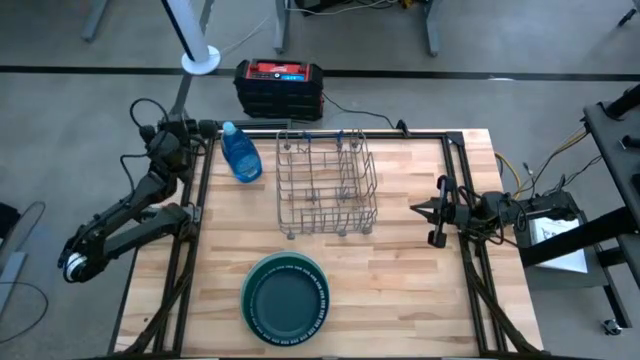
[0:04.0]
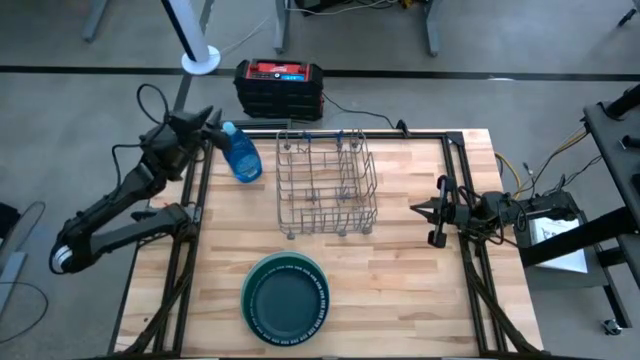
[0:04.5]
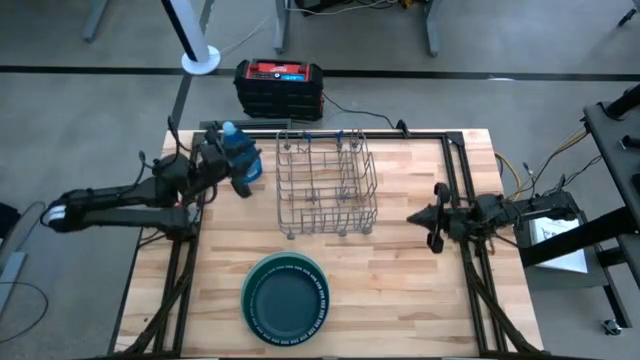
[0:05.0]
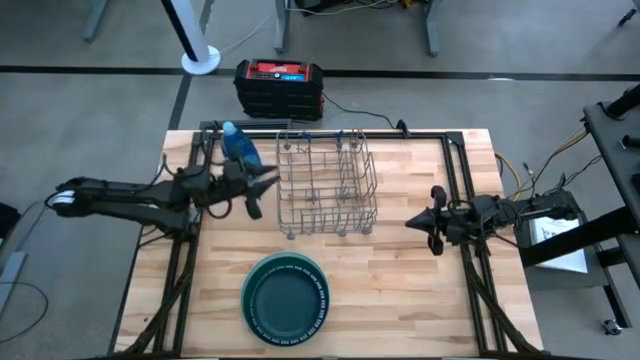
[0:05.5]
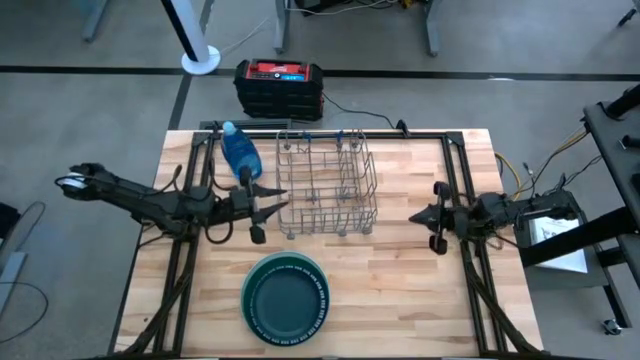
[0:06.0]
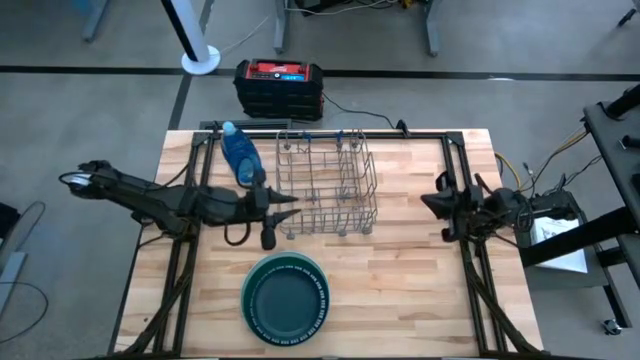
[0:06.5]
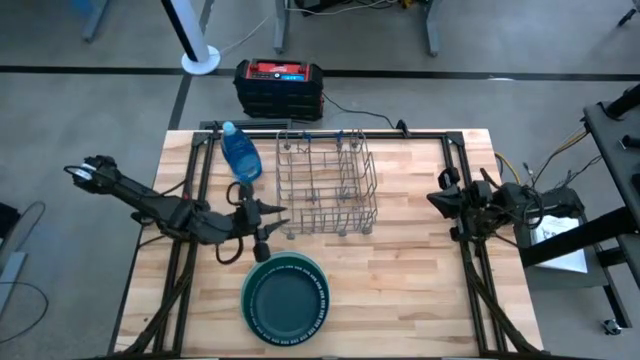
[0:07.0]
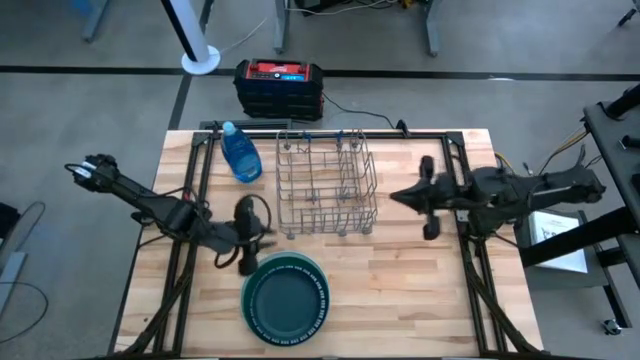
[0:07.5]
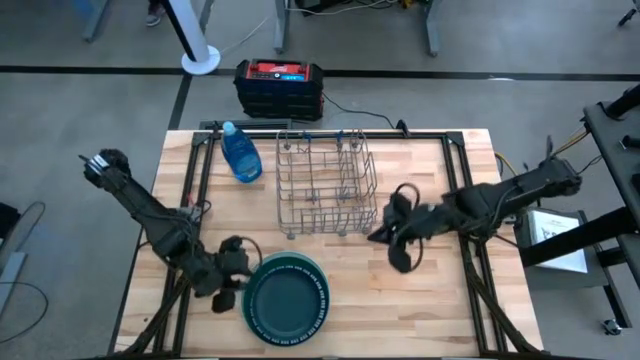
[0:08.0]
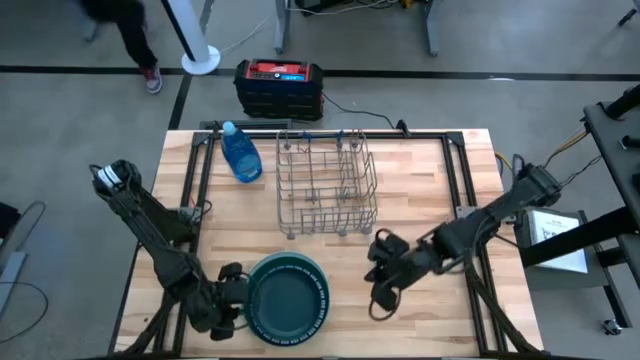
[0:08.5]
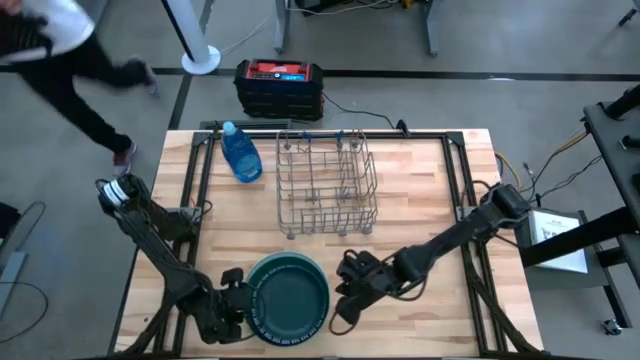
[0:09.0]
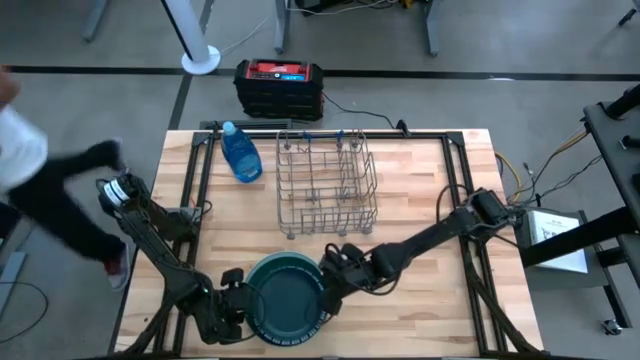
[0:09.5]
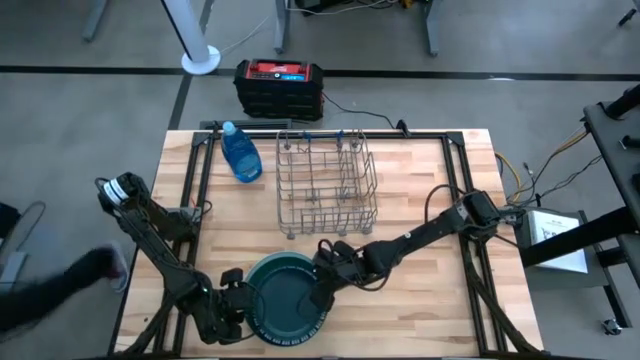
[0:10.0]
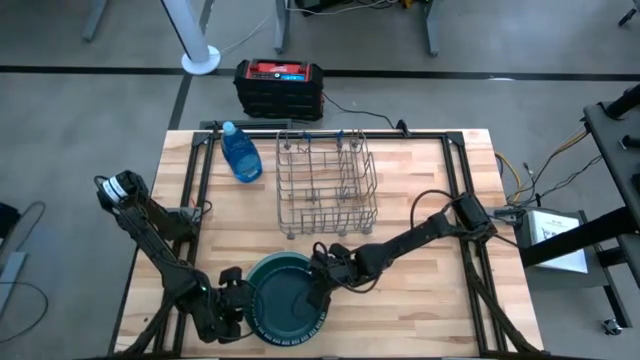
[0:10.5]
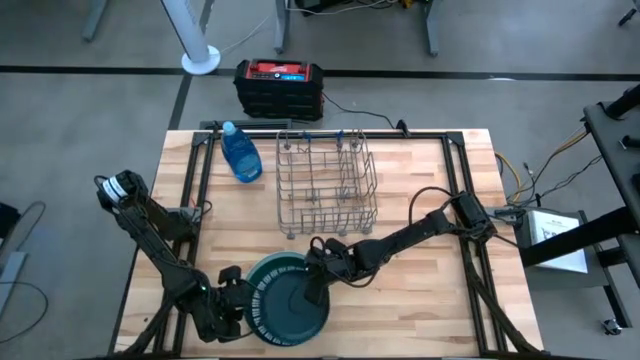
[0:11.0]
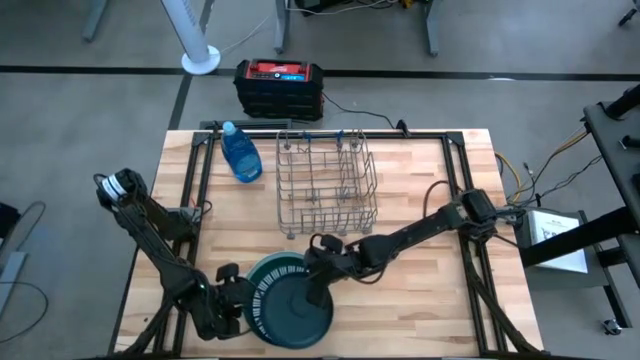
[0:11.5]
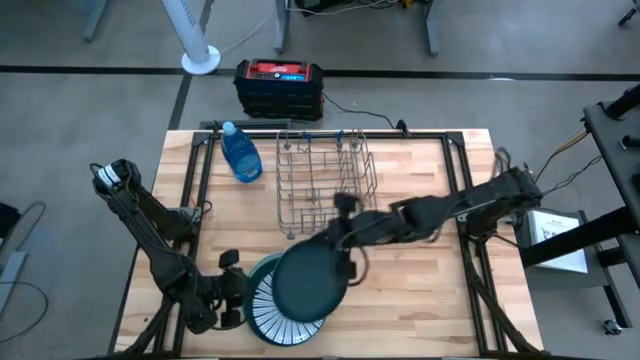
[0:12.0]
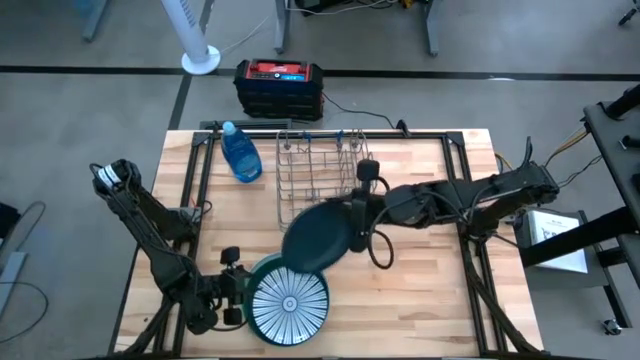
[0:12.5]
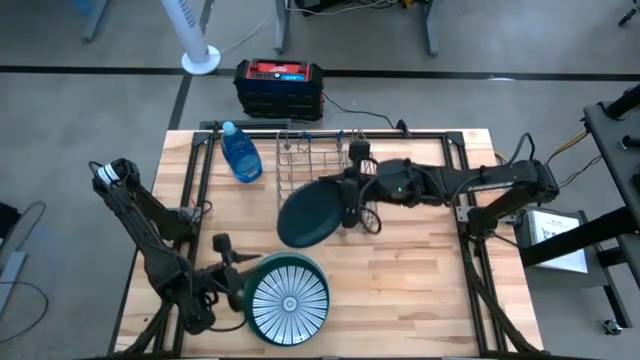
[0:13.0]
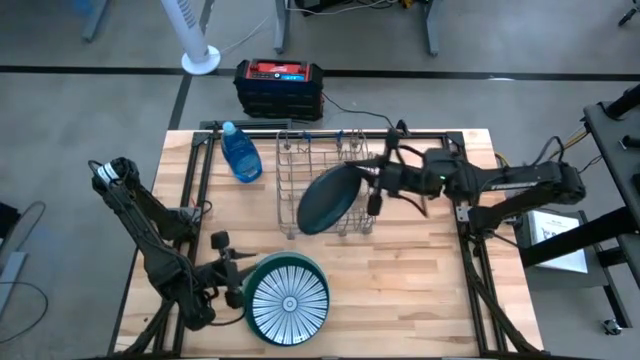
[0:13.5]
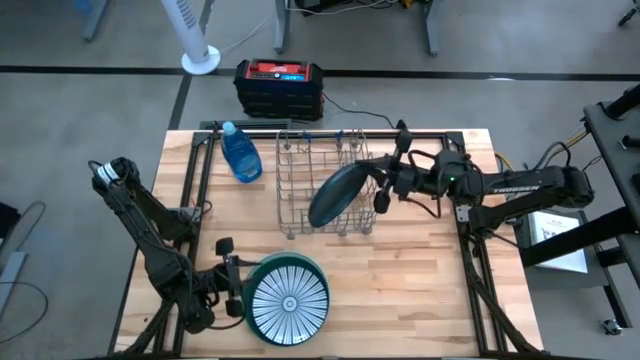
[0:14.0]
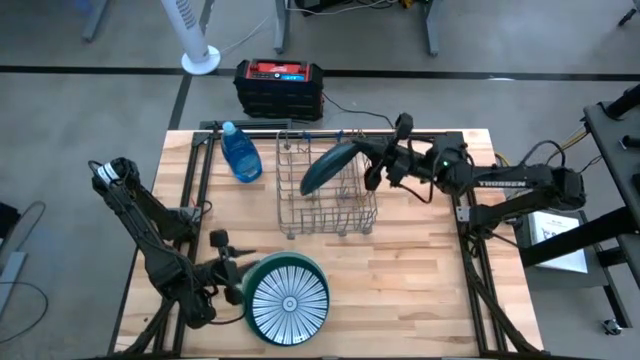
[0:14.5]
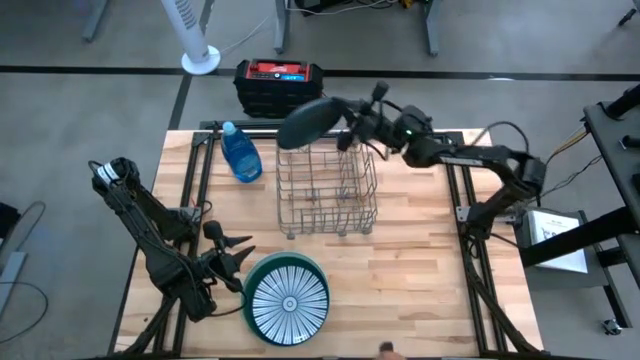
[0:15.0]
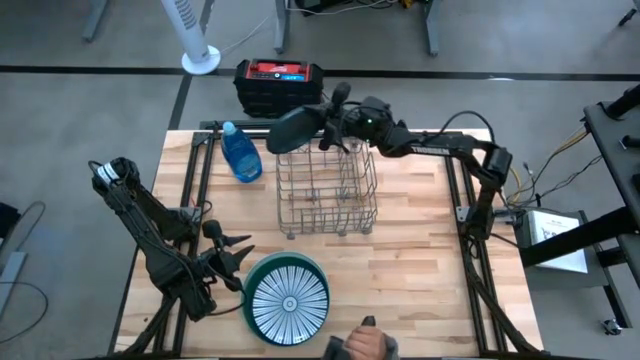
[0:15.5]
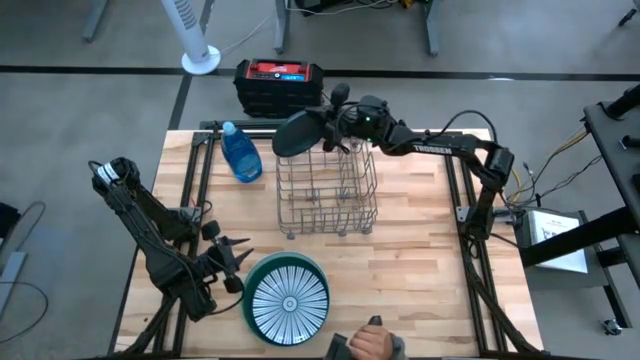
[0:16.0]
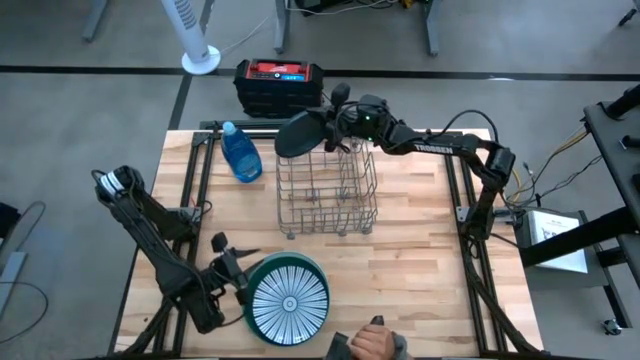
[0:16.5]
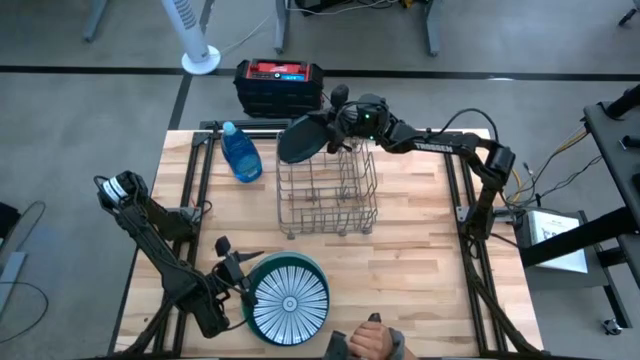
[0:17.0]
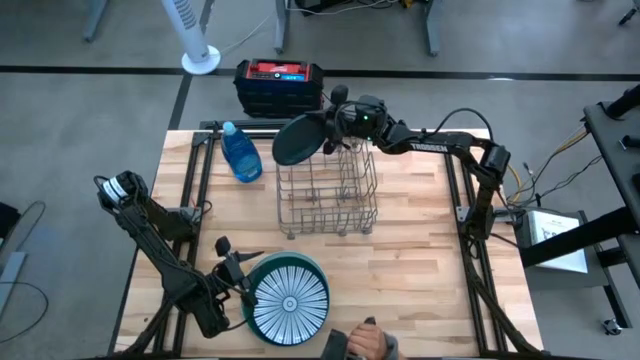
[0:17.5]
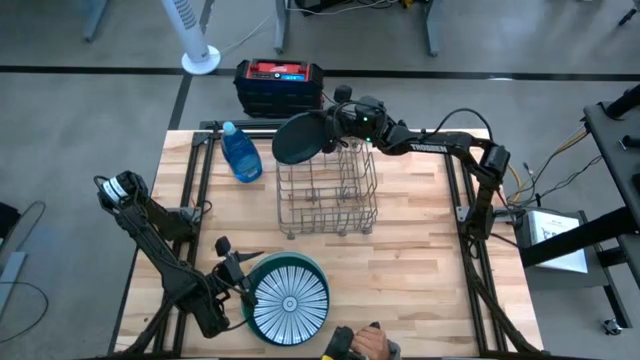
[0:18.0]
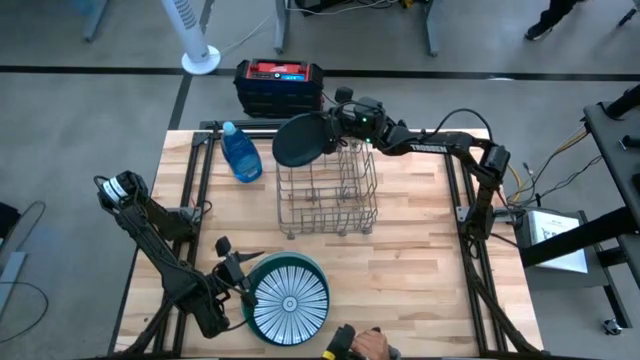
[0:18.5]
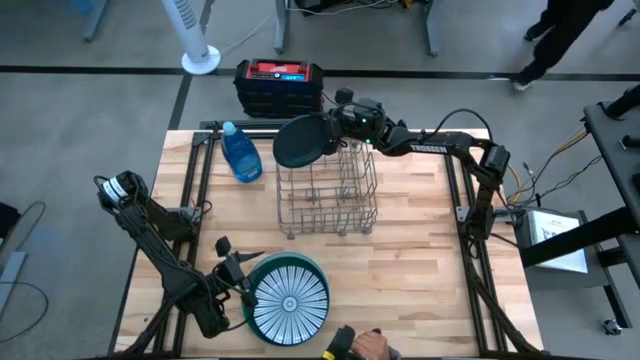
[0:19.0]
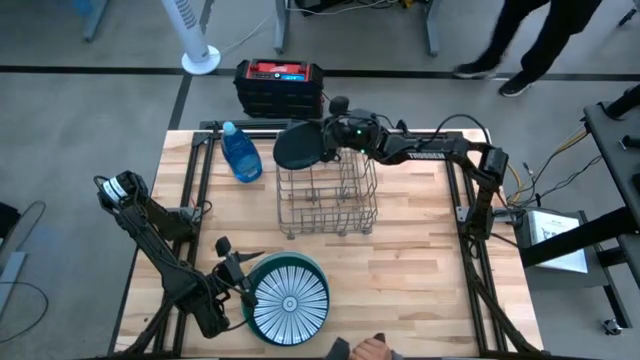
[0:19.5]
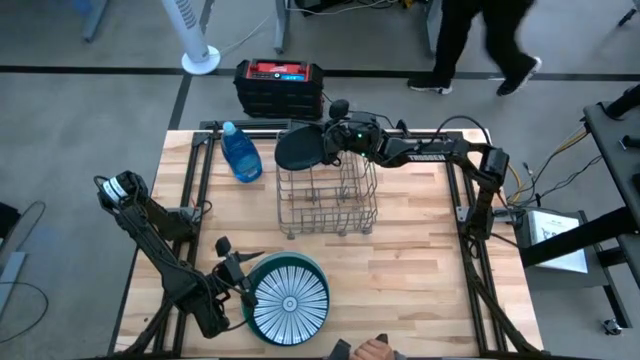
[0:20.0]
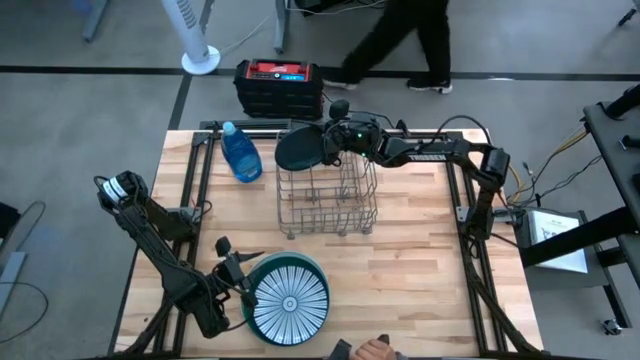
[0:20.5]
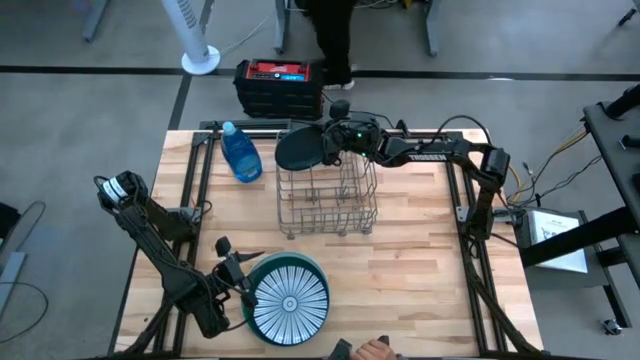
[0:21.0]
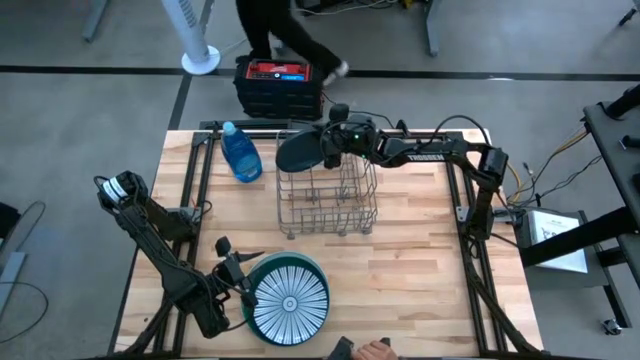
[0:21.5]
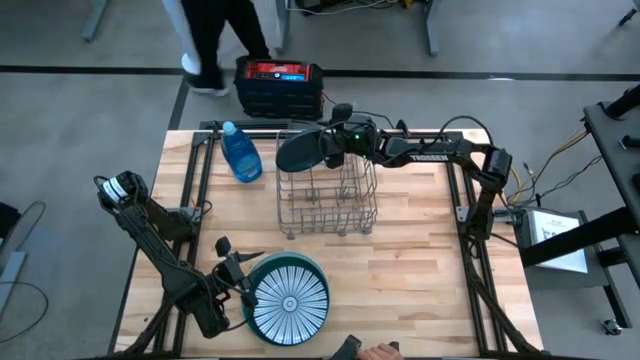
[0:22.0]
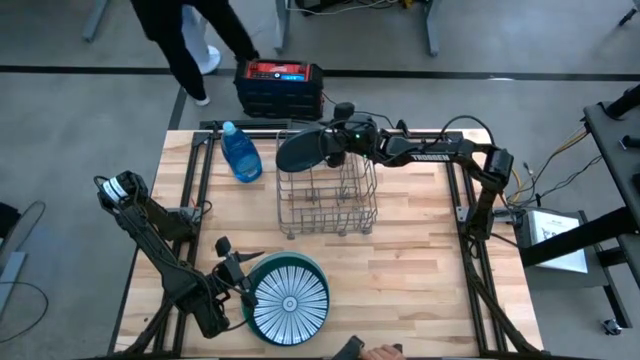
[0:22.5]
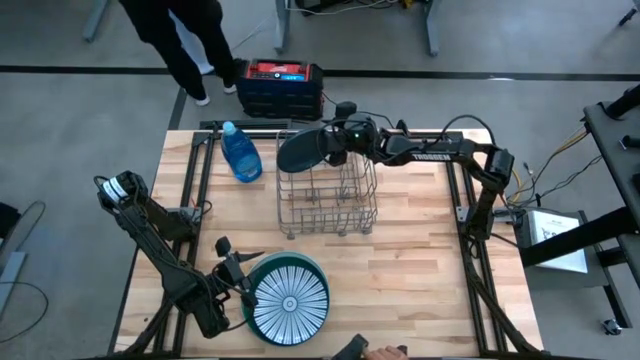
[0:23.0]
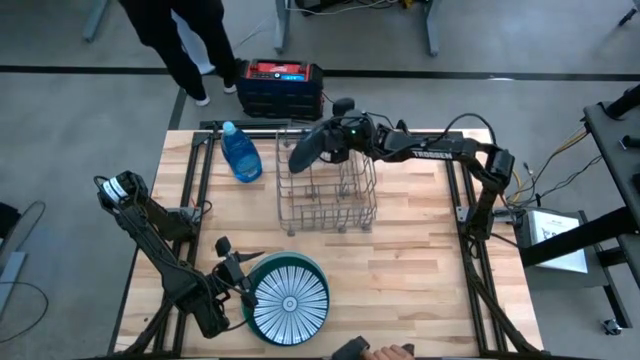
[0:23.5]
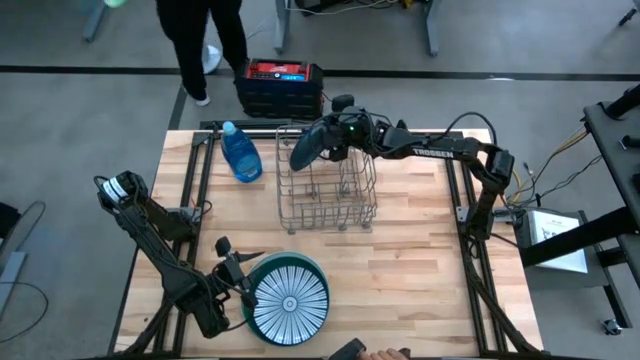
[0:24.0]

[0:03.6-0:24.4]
Task: Sort dishes
Put the blue plate into the gray dishwasher rack
